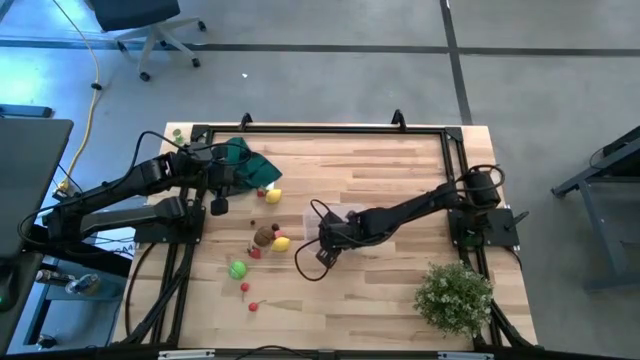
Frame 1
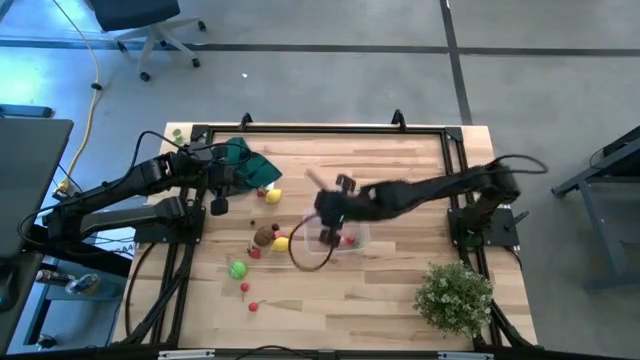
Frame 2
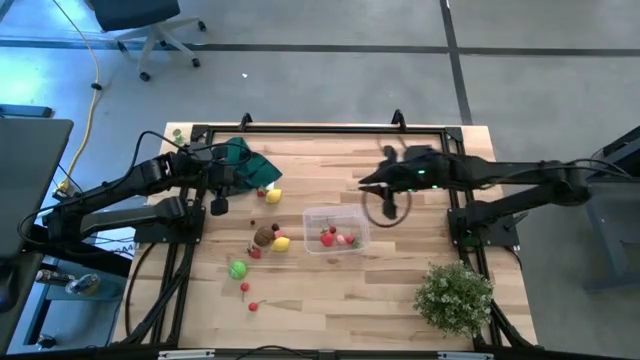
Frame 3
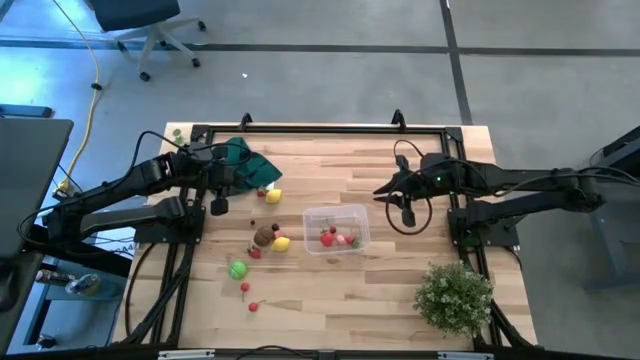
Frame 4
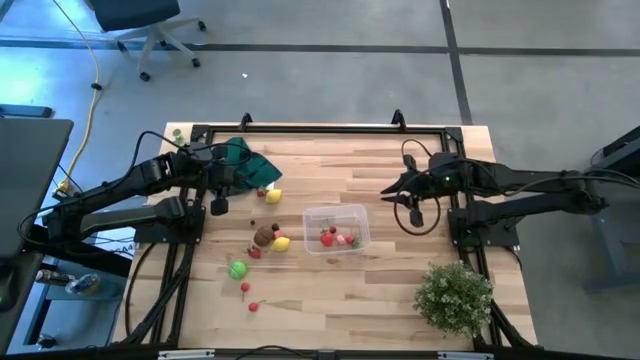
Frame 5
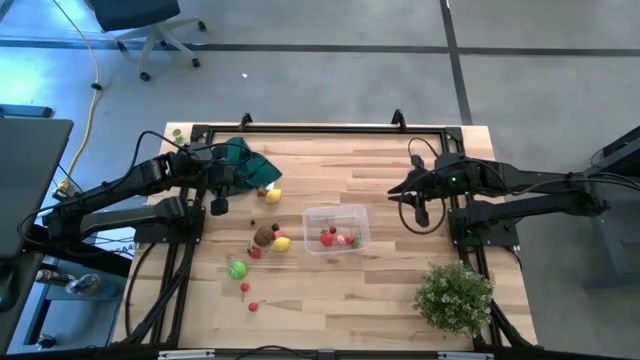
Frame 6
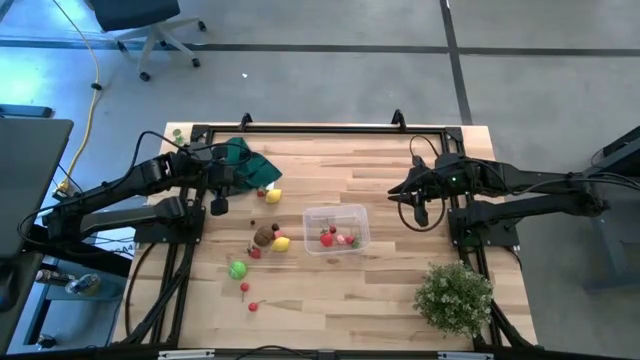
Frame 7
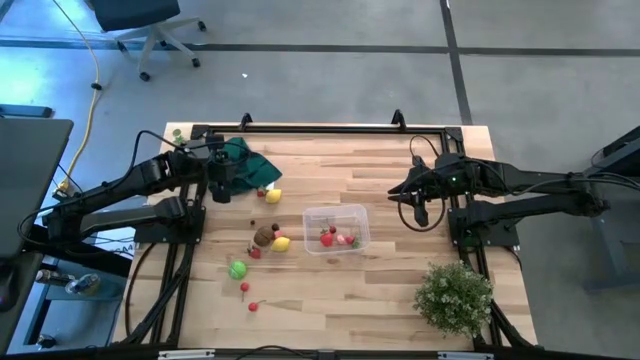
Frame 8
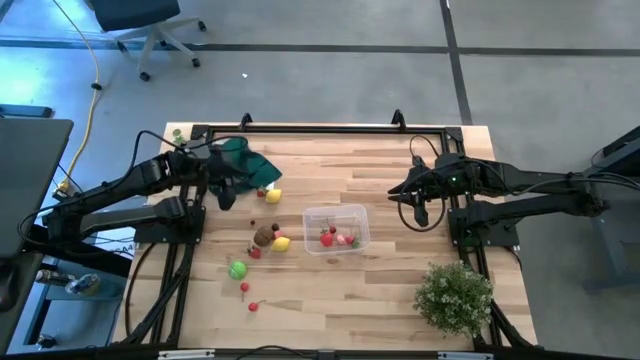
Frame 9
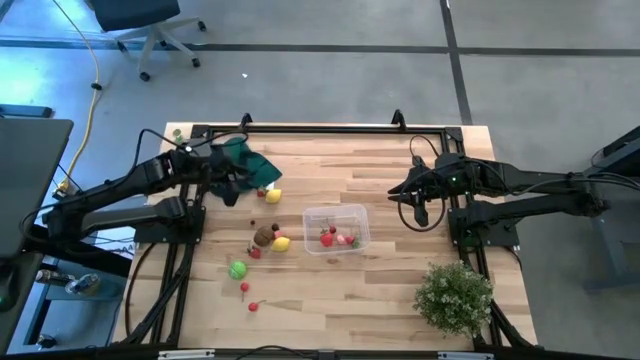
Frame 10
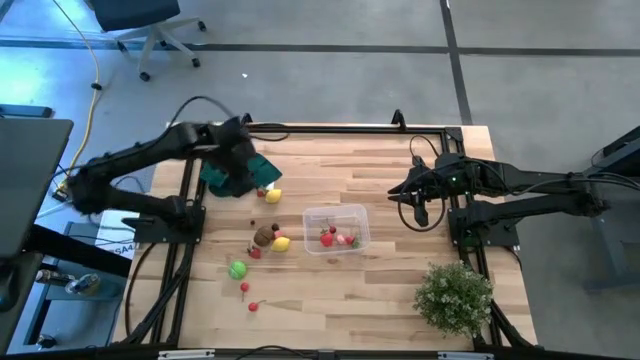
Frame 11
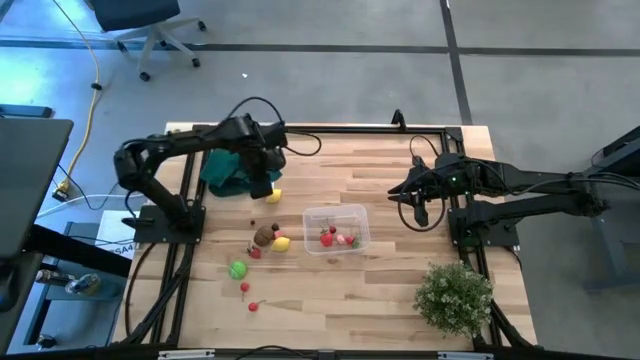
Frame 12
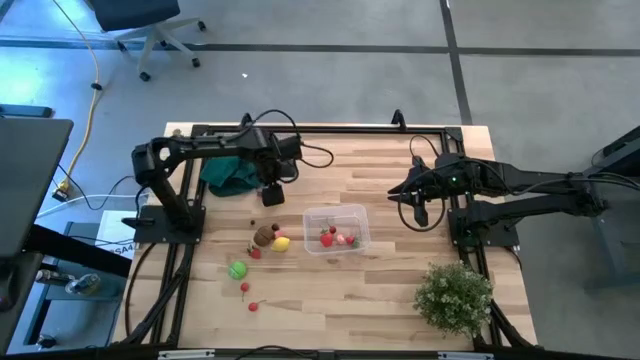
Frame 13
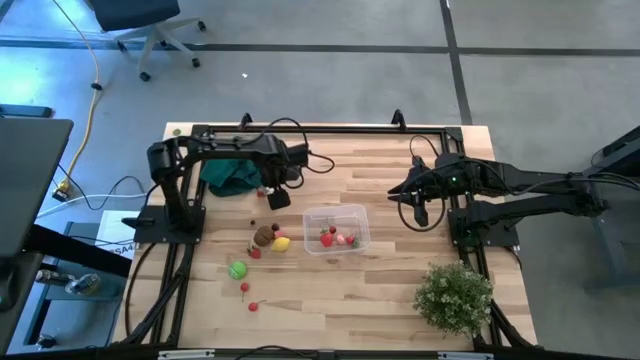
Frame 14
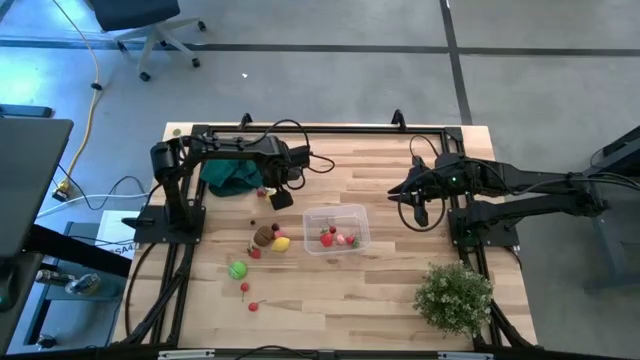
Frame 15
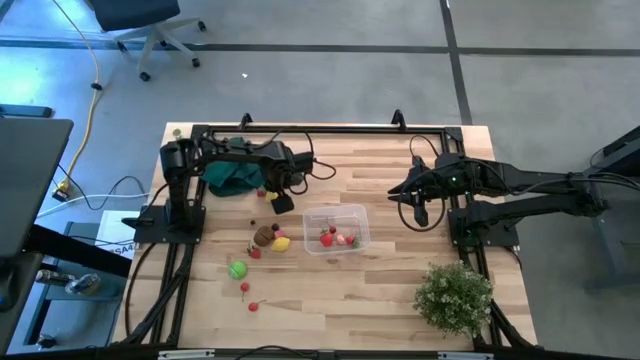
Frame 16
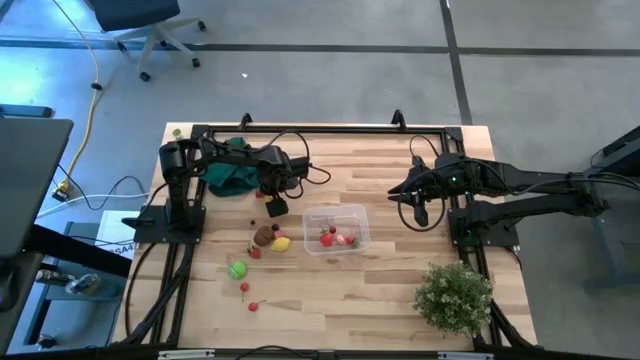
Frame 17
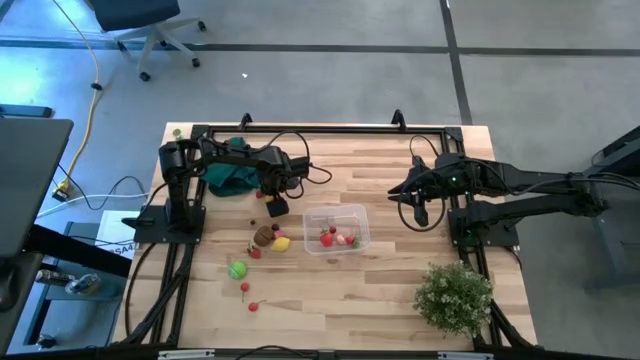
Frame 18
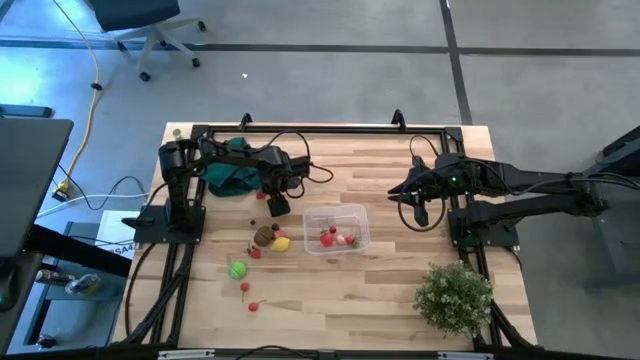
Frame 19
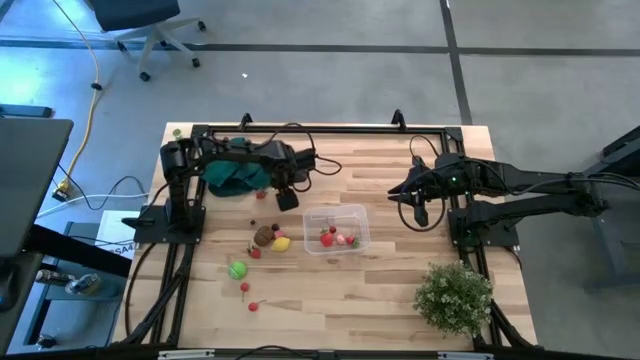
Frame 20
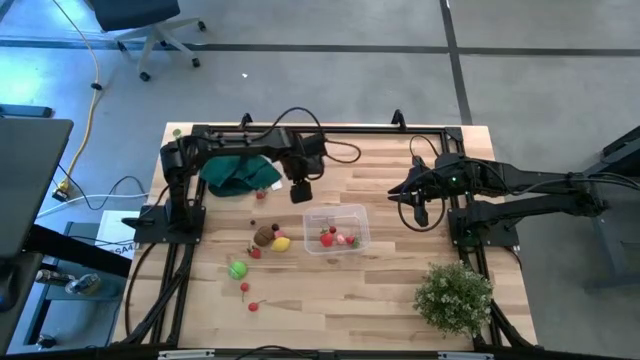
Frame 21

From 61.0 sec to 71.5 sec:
Task: Pick and placing Produce into tupperware
Put the top yellow lemon into the transparent bin

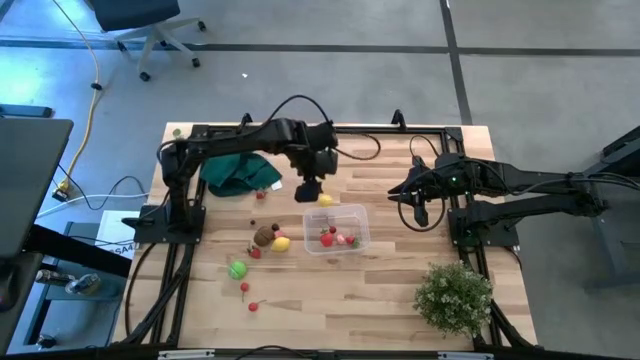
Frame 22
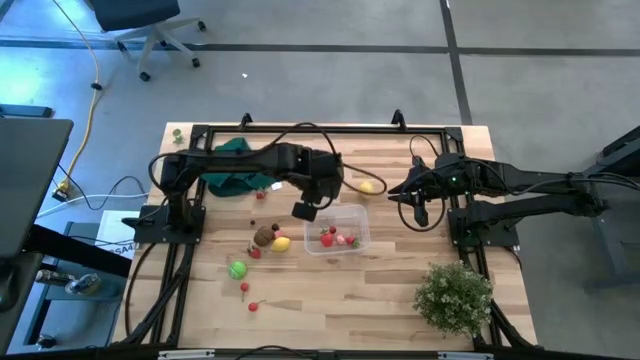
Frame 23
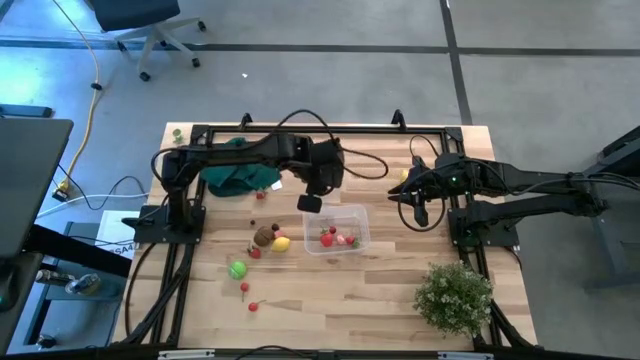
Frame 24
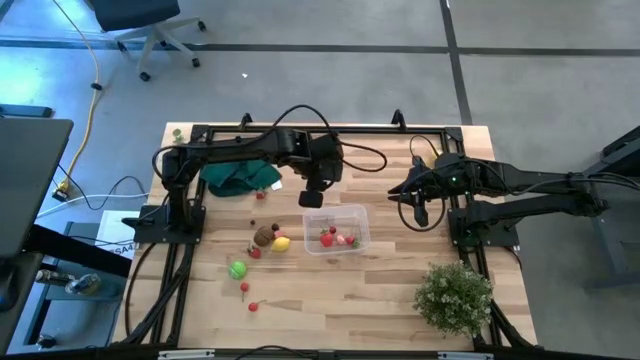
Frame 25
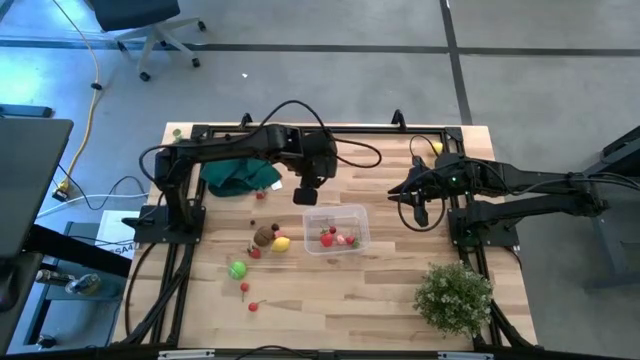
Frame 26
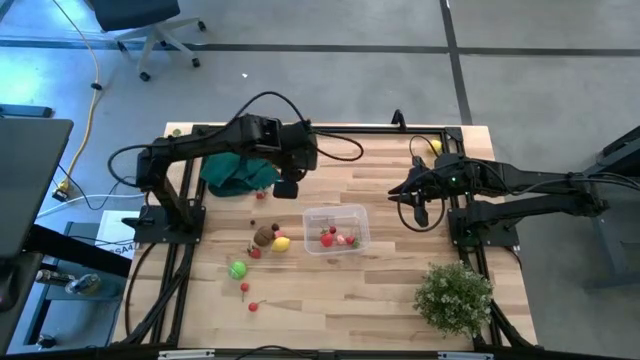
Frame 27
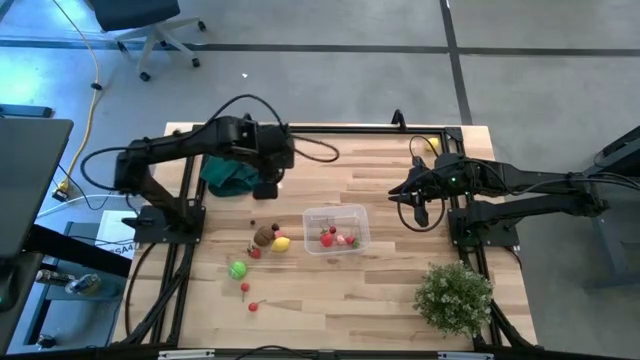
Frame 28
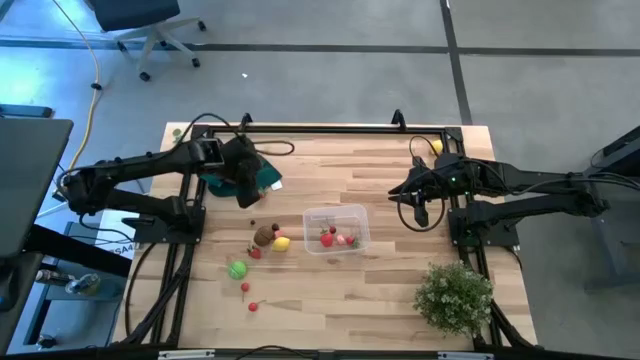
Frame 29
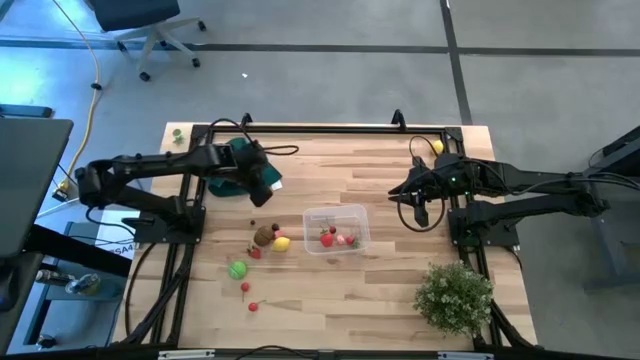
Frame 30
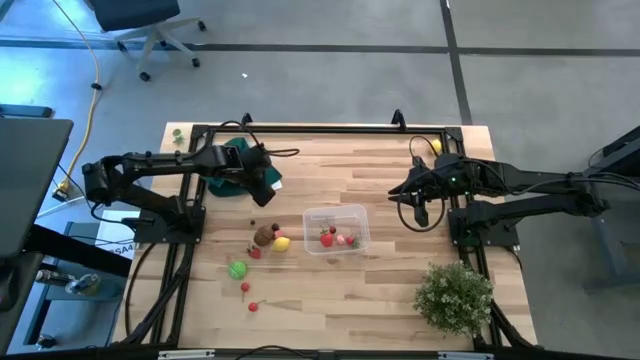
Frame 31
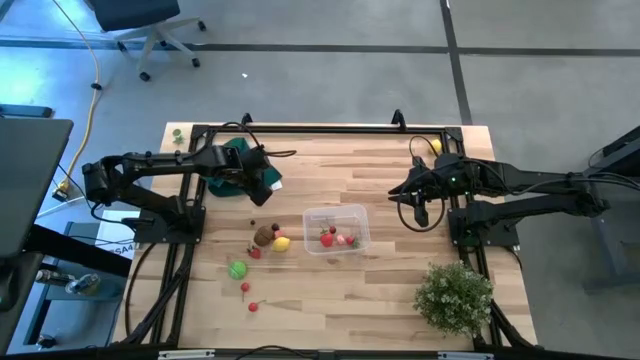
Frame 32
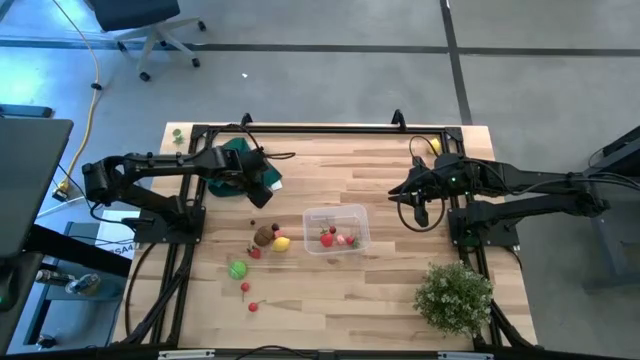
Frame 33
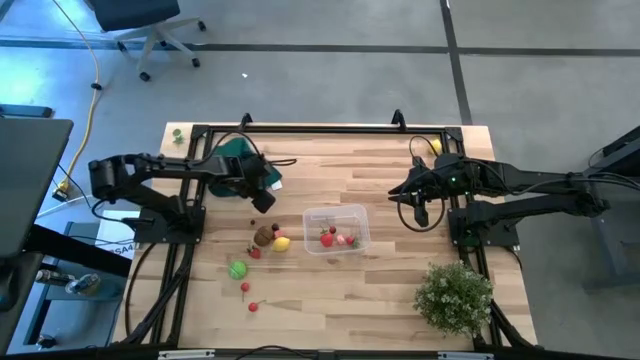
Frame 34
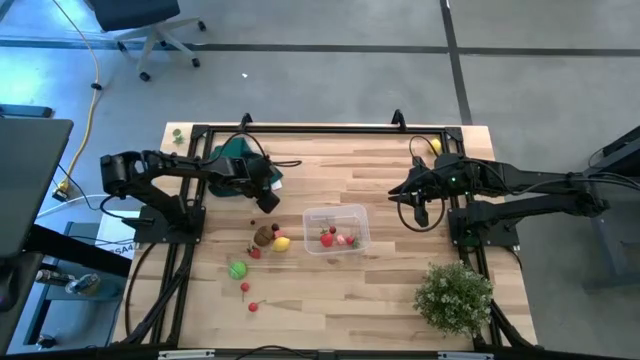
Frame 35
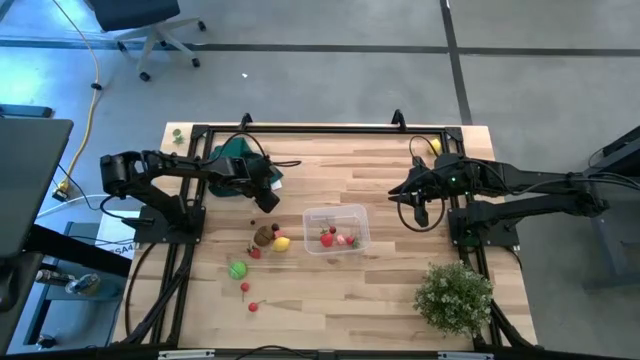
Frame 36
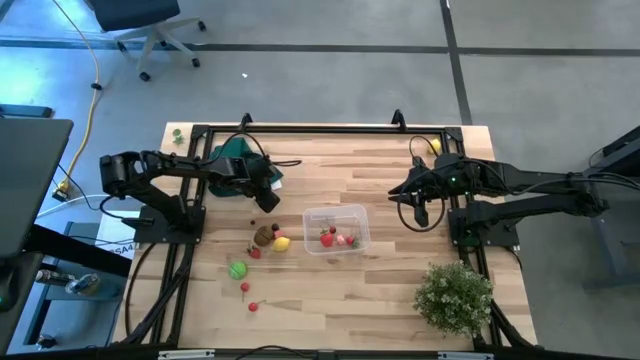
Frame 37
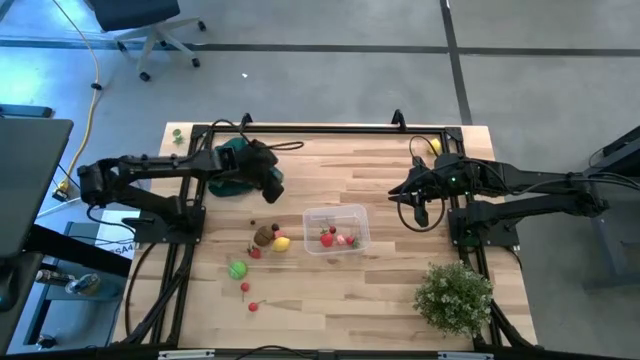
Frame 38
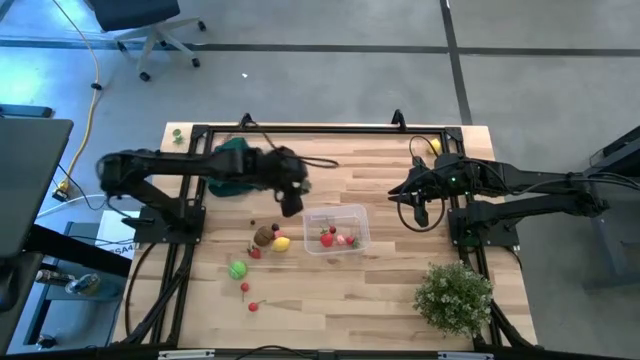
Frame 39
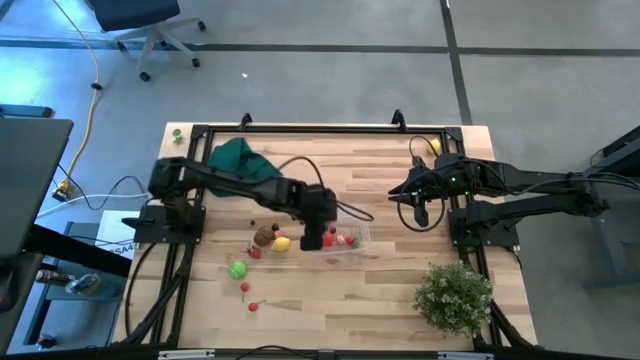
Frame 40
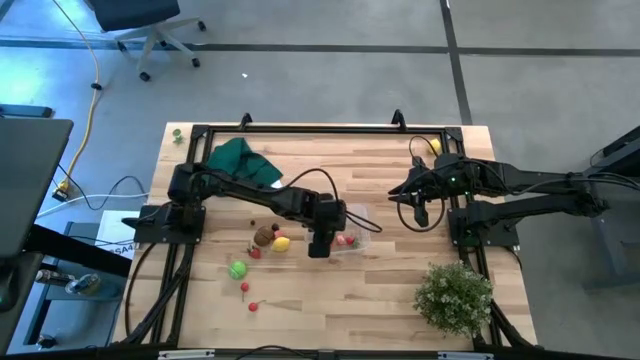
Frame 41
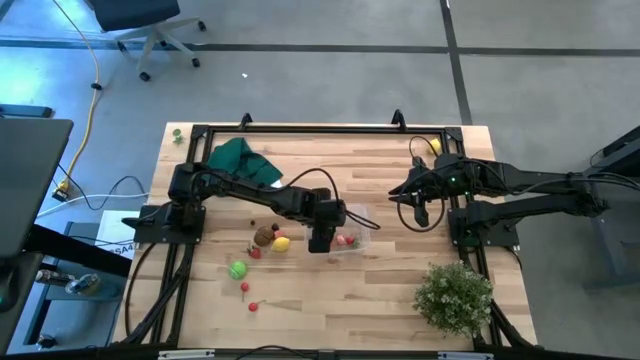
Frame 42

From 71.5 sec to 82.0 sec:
Put the top red strawberry into the transparent bin
